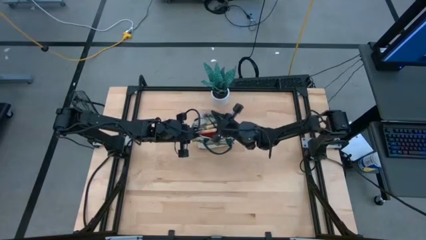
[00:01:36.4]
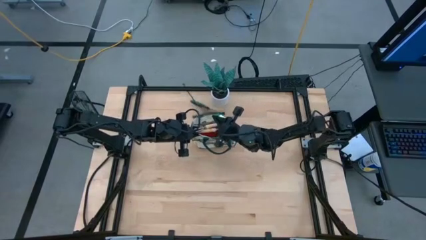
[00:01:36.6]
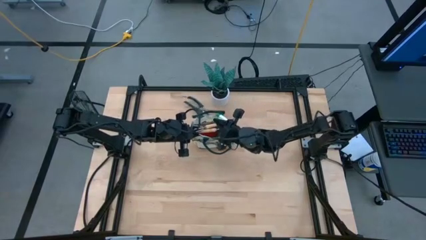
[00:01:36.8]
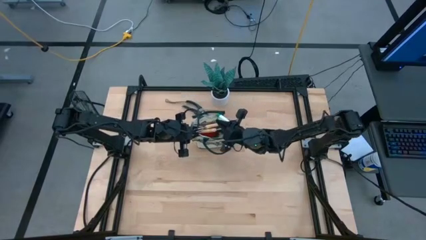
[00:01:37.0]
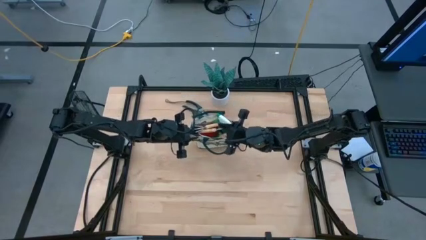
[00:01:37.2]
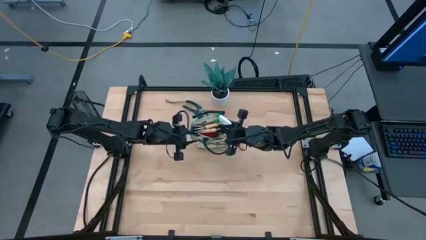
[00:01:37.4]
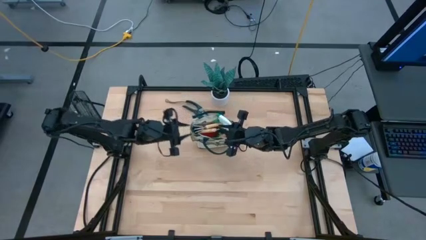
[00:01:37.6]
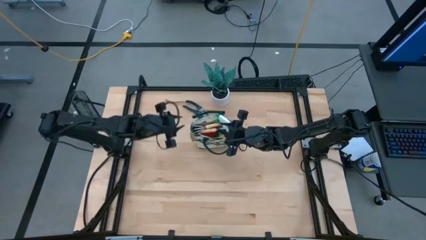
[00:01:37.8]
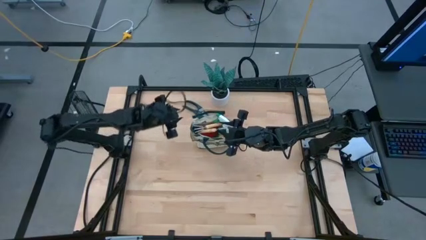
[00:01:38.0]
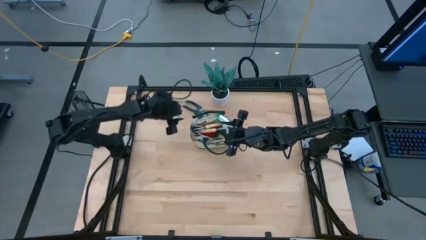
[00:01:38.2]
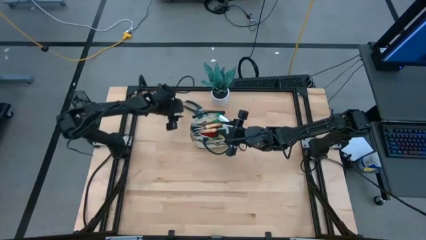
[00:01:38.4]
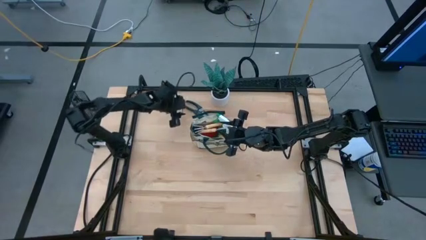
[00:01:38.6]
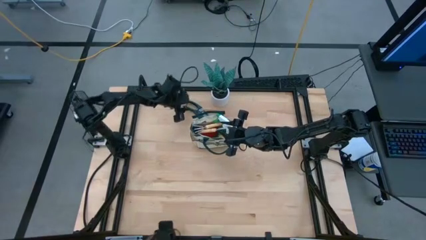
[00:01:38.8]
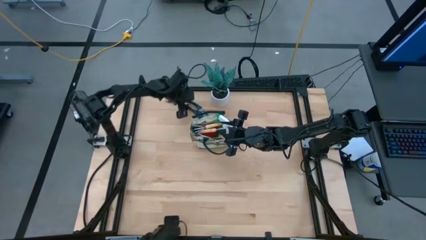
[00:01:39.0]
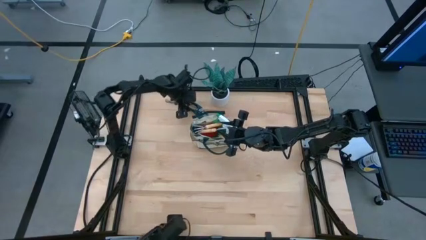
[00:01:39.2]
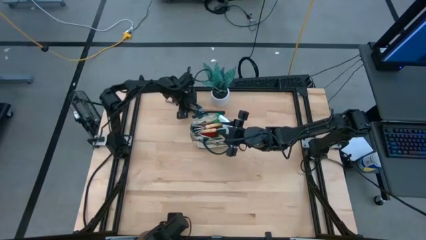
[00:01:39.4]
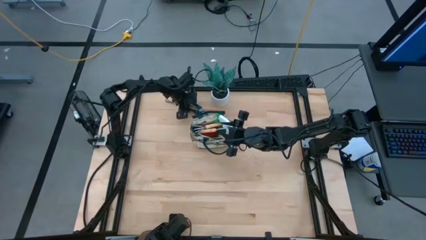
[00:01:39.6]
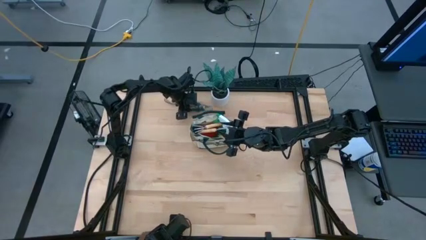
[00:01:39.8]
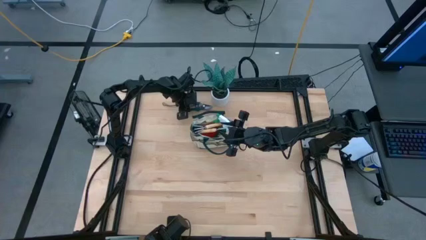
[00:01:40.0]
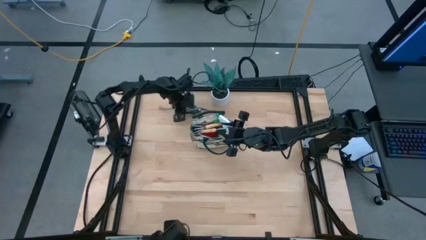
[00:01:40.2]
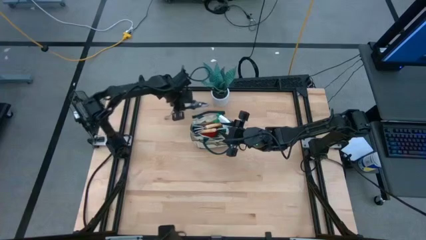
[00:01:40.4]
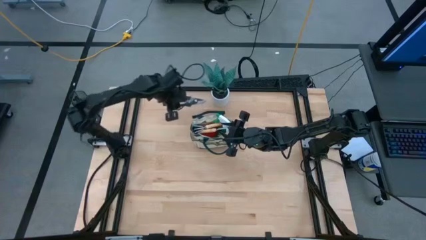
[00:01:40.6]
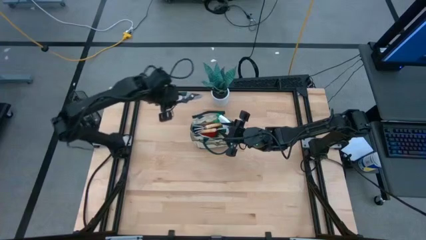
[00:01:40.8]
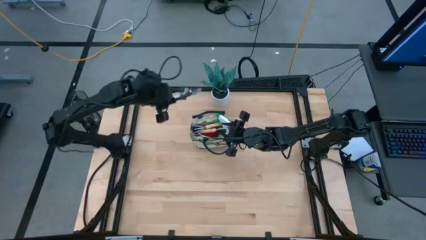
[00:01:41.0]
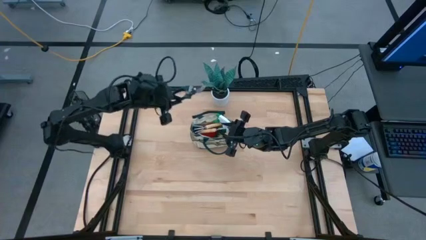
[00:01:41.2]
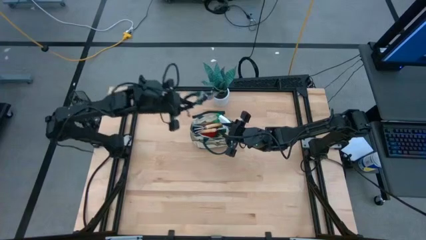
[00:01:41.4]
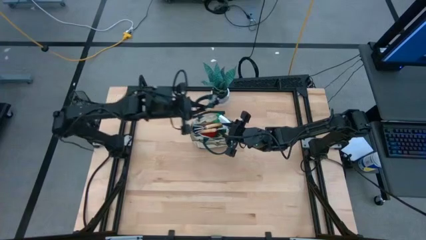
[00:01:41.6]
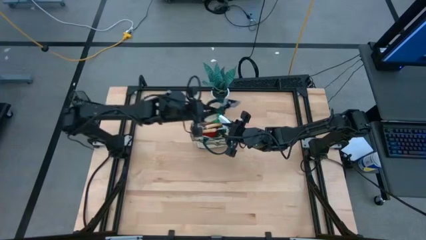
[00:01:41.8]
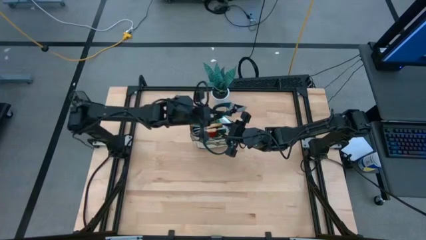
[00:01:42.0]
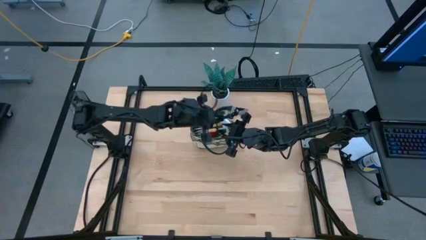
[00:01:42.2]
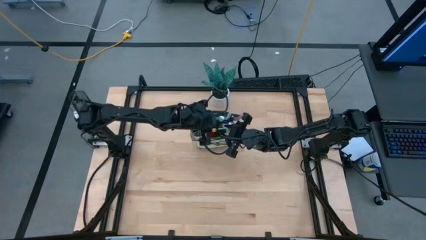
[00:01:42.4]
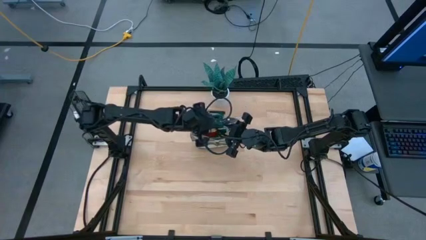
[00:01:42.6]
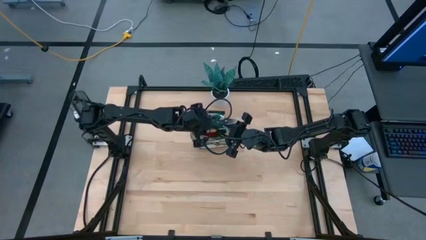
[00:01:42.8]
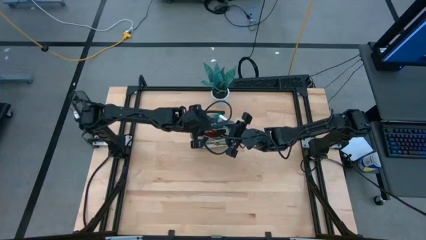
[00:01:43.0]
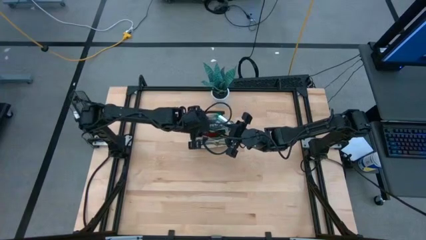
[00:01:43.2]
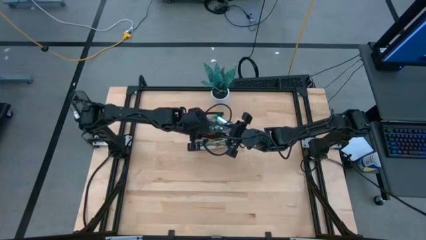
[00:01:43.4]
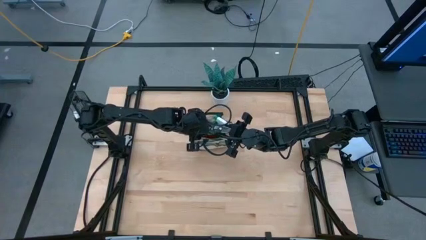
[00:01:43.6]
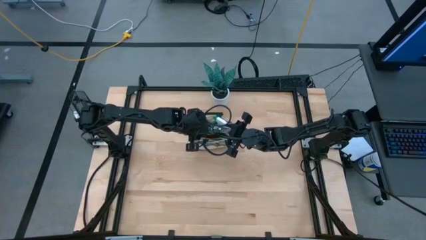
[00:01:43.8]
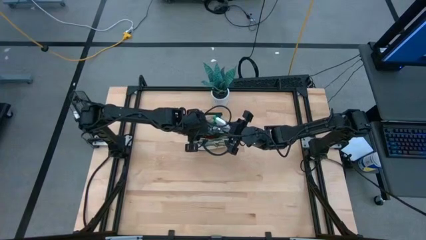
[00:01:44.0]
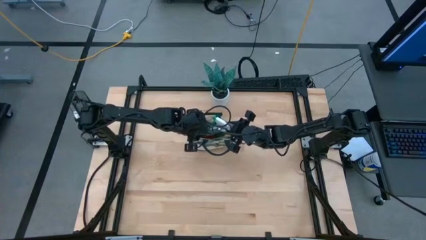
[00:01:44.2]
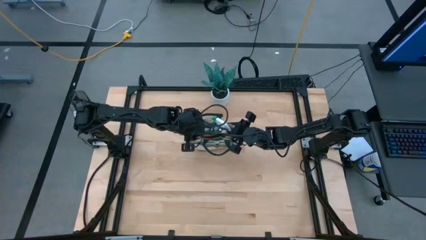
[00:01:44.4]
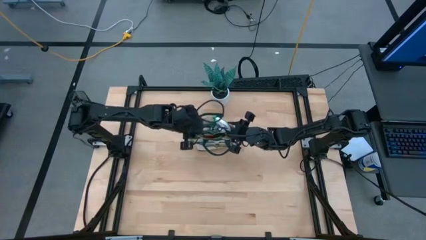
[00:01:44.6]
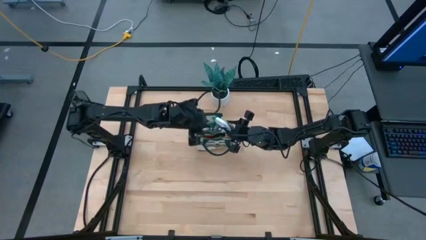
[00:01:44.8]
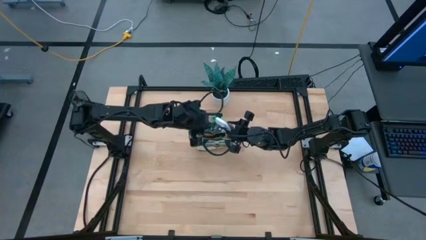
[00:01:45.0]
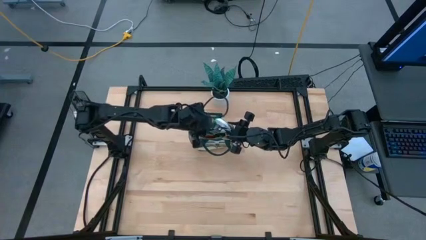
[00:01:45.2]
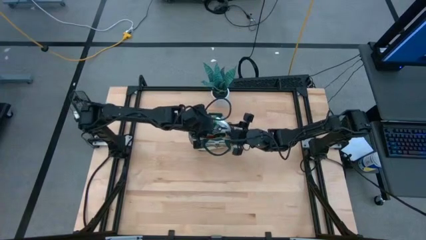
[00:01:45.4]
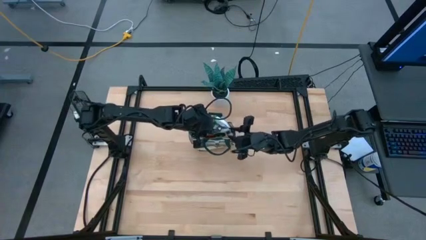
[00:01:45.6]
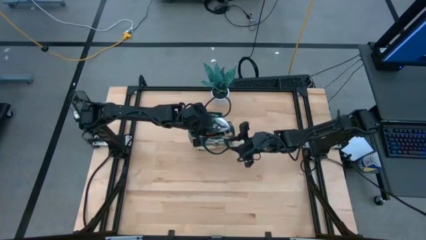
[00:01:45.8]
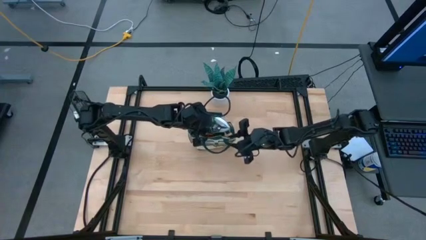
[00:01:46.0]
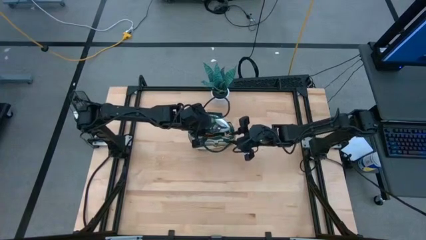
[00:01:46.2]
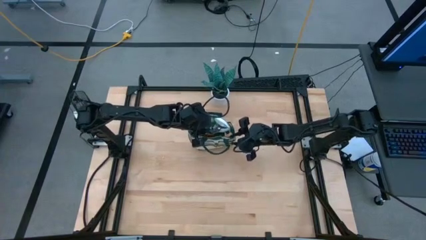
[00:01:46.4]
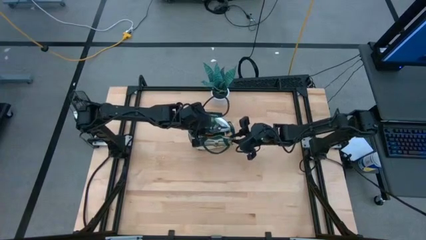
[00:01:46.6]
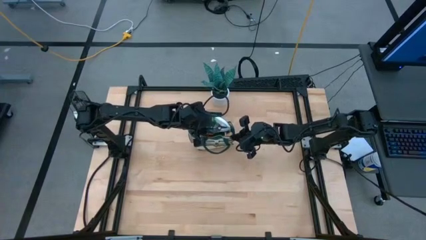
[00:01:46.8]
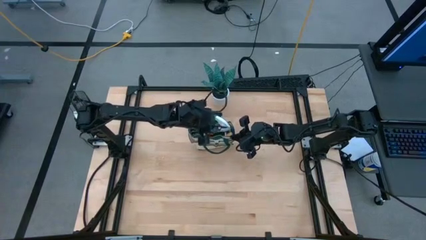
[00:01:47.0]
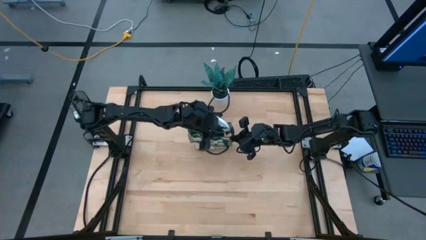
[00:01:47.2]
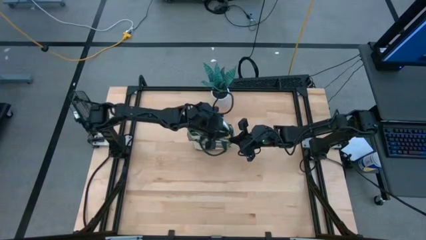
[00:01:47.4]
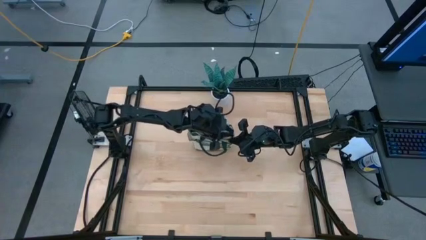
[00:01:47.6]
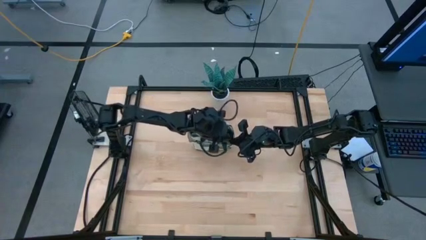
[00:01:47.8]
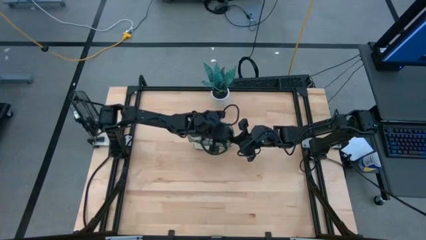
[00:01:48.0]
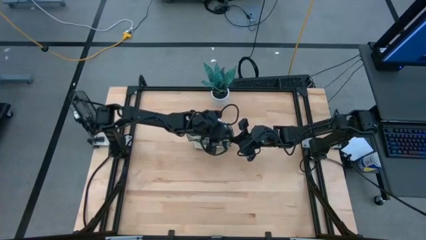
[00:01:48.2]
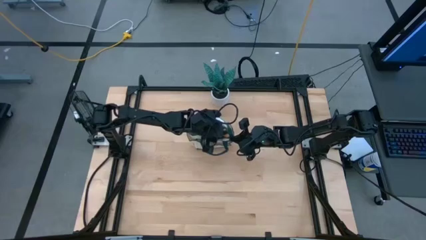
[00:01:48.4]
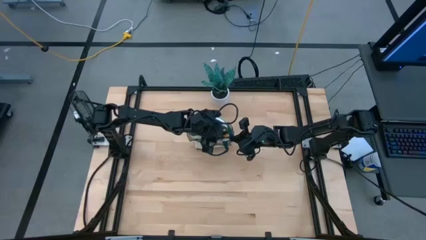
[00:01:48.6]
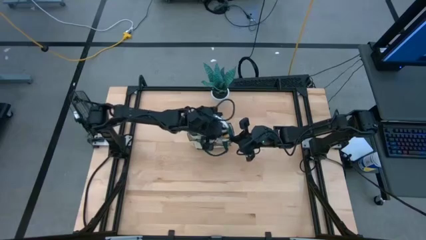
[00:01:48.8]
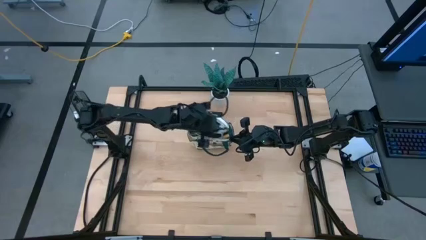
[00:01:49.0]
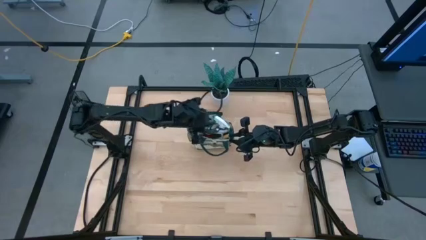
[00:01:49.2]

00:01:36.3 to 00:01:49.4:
Task: Pick & Place Garden tools in Gardening bag
Put the green shear scissors into the brown gardening bag

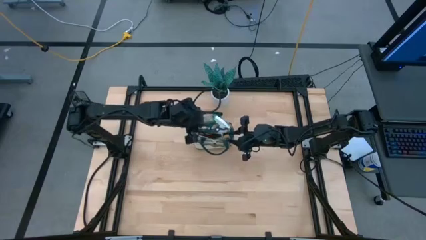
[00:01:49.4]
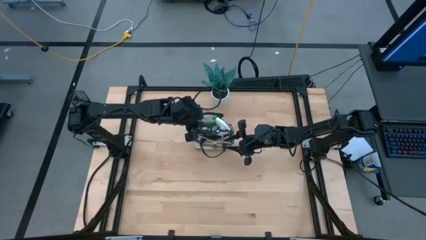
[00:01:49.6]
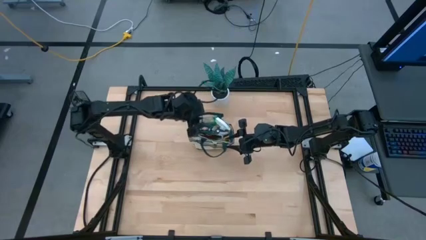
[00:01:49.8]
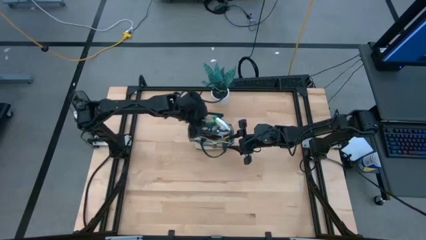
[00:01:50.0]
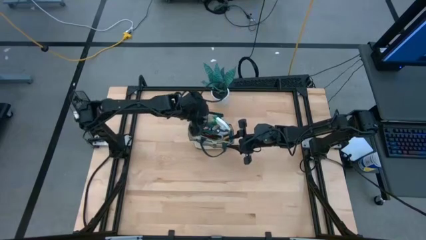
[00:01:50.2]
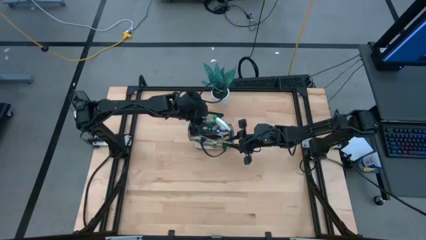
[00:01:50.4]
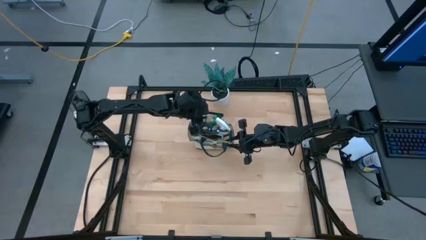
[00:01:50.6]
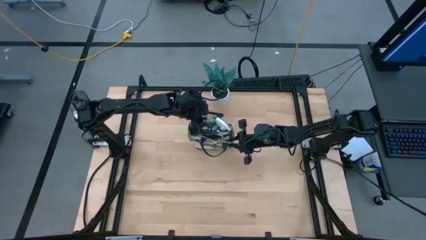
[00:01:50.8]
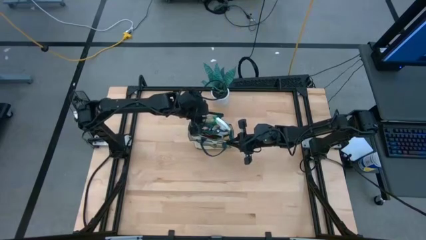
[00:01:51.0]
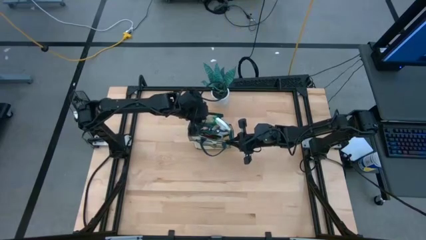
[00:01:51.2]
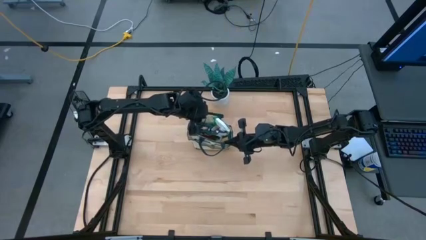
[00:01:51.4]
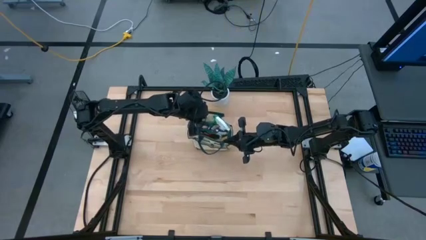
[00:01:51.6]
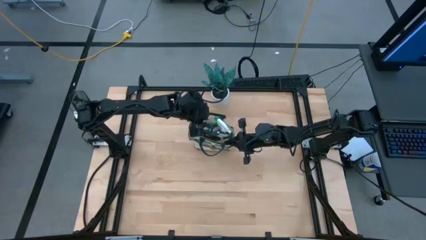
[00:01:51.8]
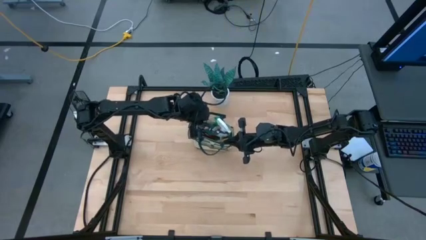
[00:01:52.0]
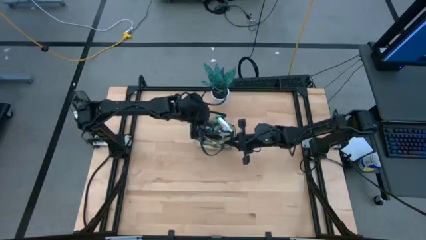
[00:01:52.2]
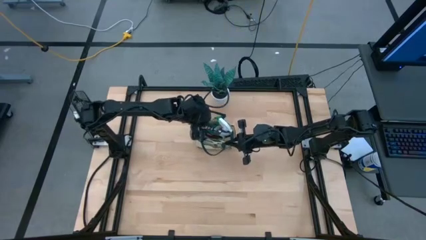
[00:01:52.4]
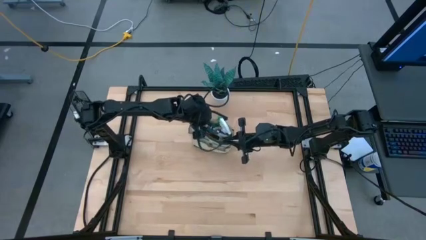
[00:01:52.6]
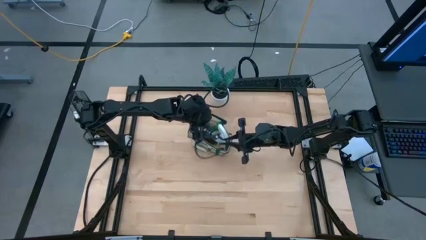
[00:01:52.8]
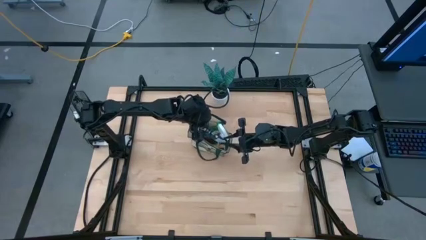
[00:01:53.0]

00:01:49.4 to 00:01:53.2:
Adjust the backpack
